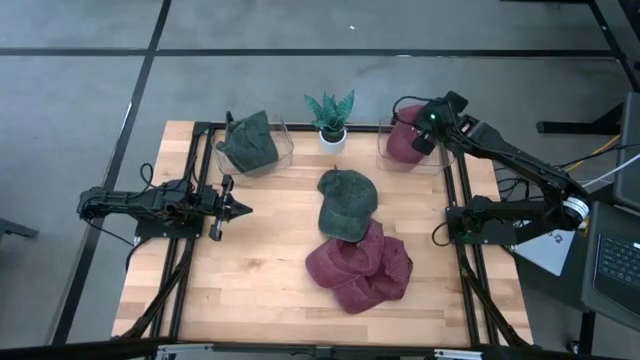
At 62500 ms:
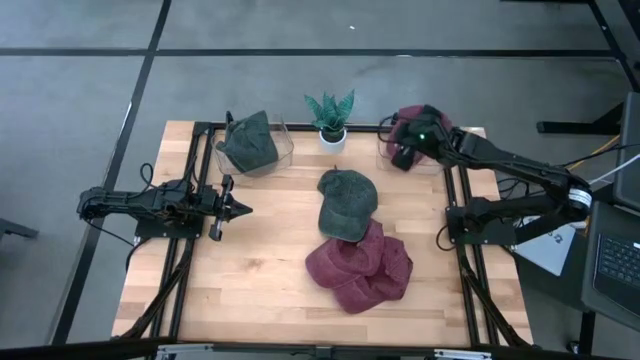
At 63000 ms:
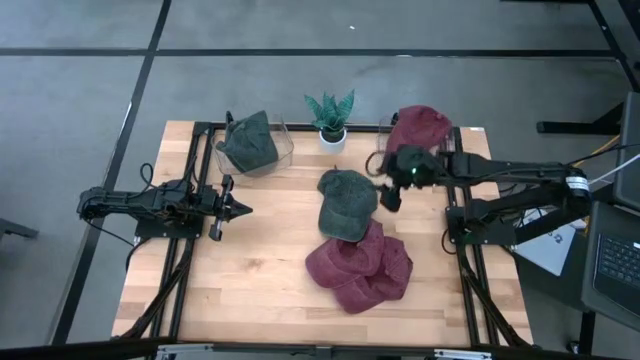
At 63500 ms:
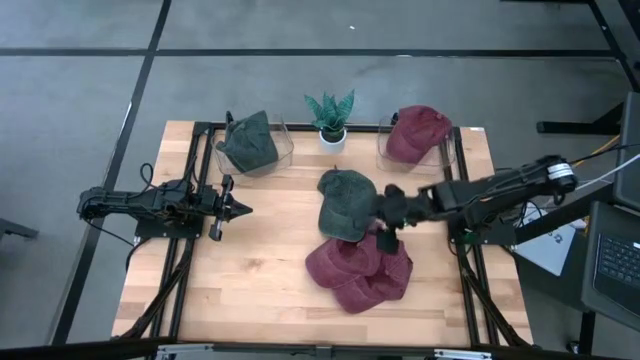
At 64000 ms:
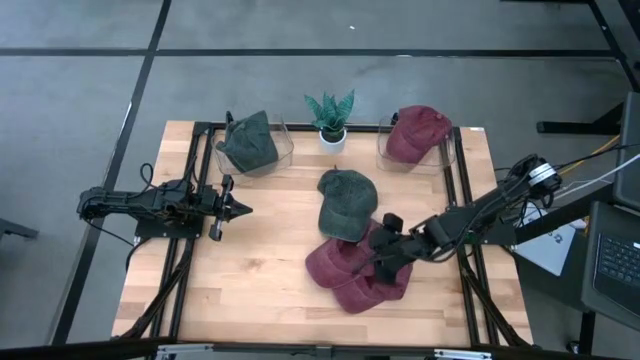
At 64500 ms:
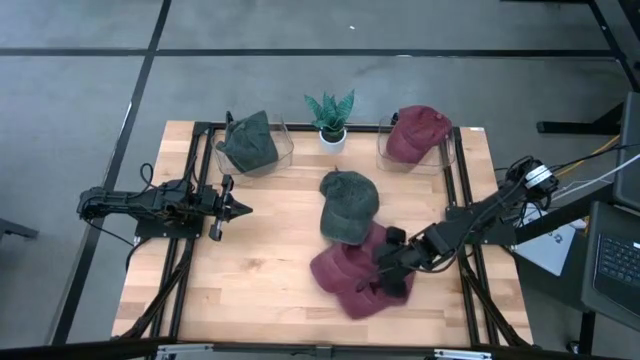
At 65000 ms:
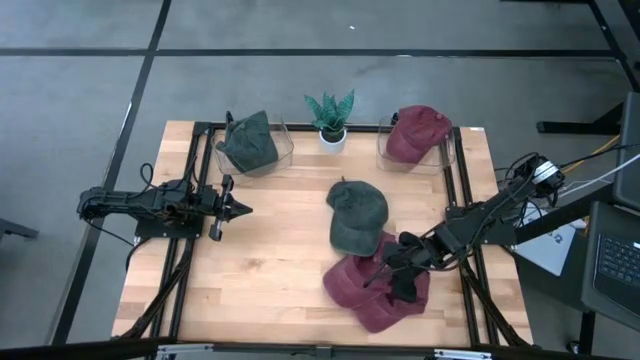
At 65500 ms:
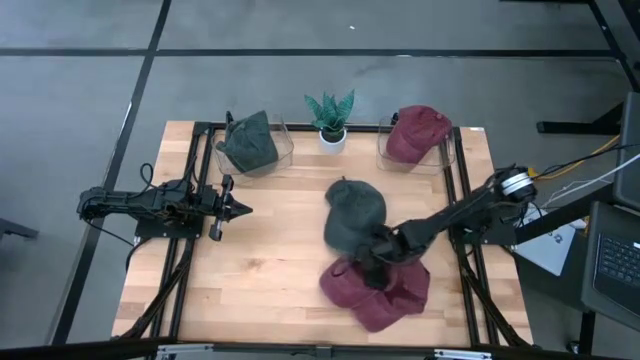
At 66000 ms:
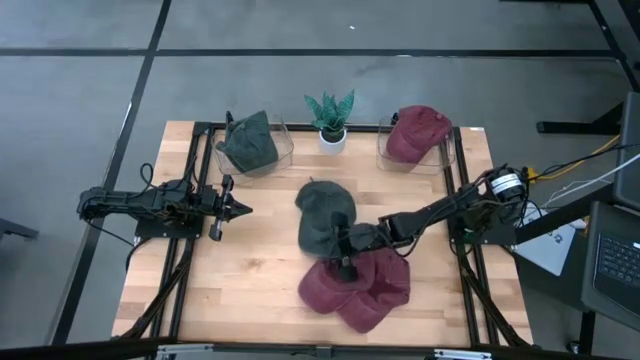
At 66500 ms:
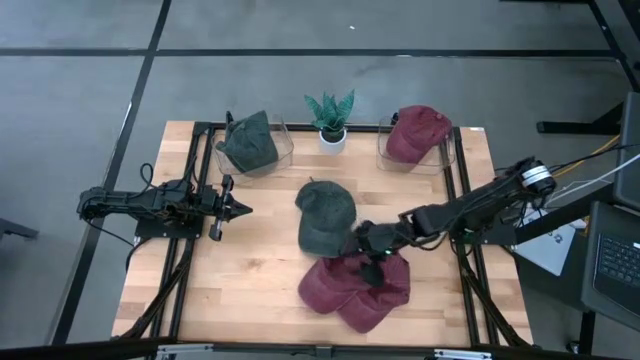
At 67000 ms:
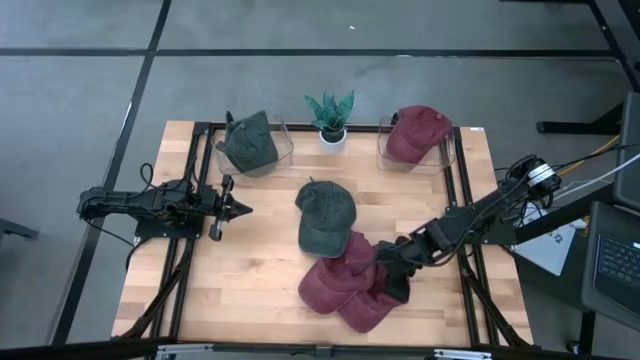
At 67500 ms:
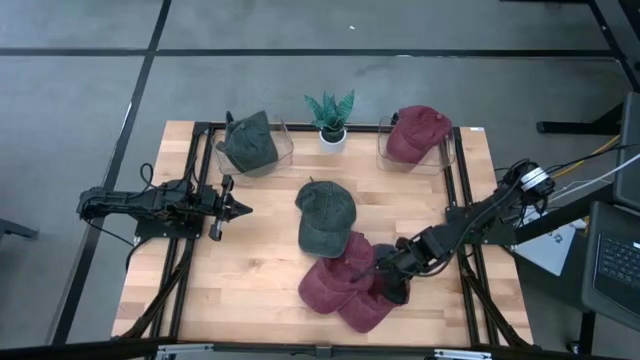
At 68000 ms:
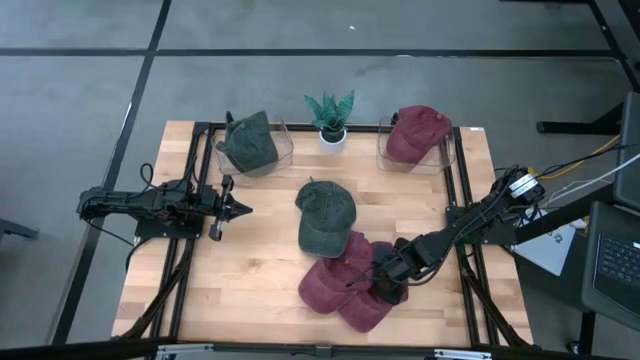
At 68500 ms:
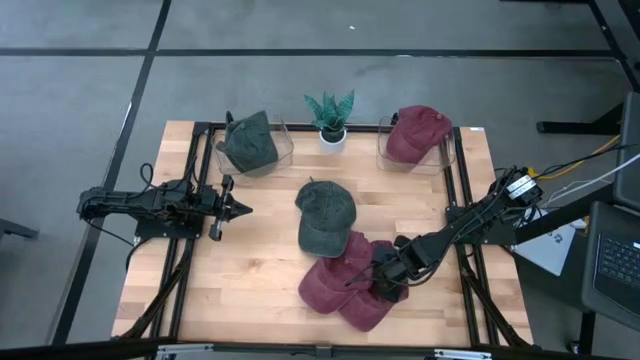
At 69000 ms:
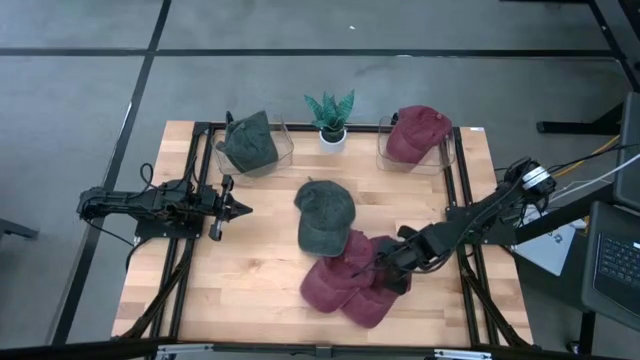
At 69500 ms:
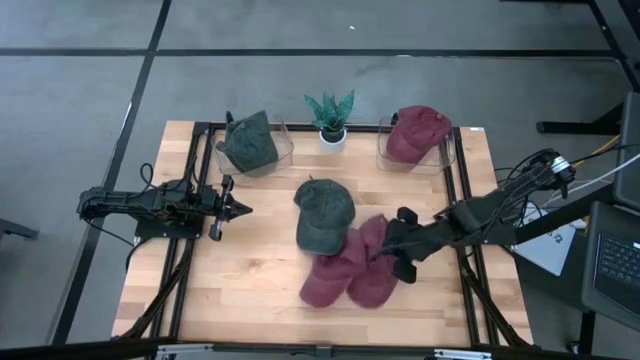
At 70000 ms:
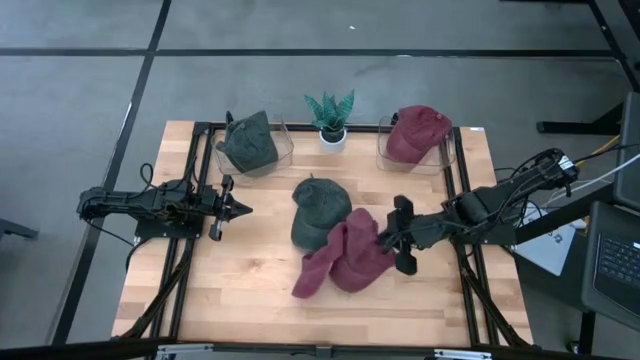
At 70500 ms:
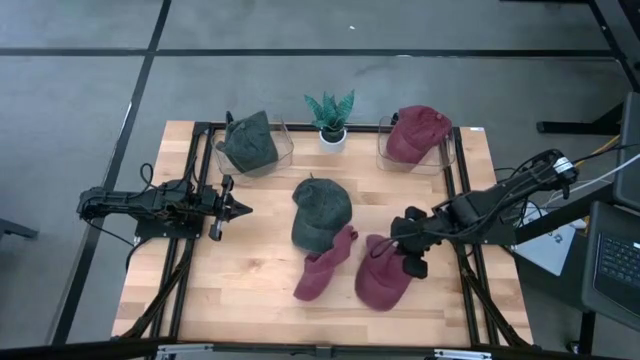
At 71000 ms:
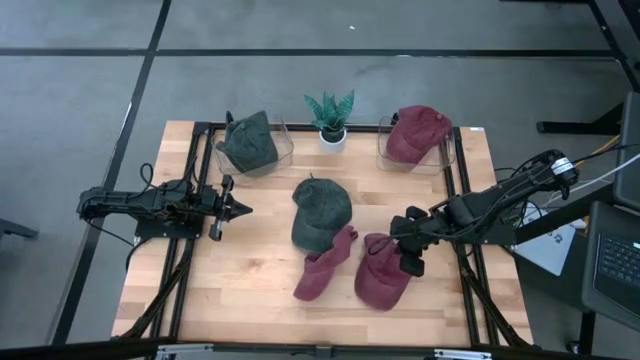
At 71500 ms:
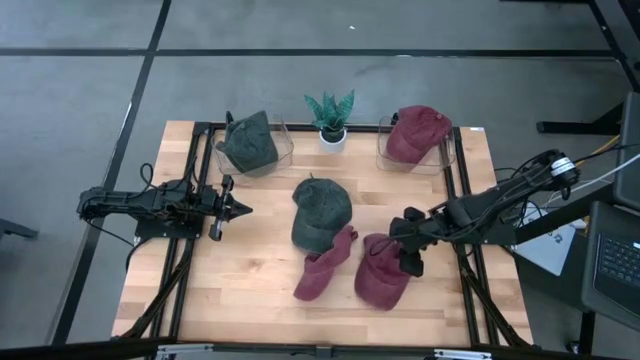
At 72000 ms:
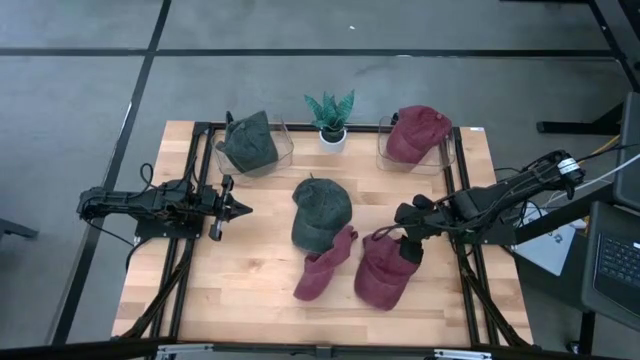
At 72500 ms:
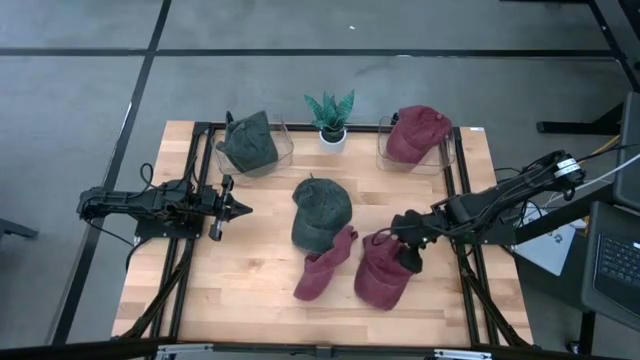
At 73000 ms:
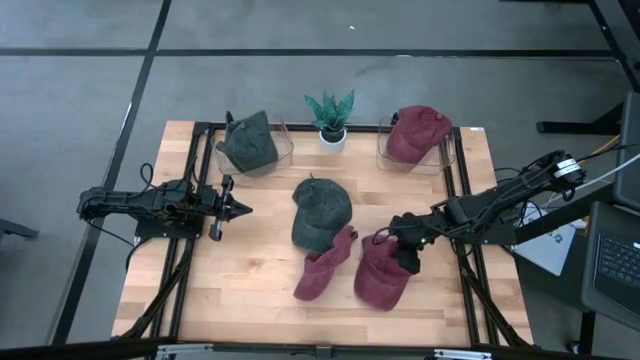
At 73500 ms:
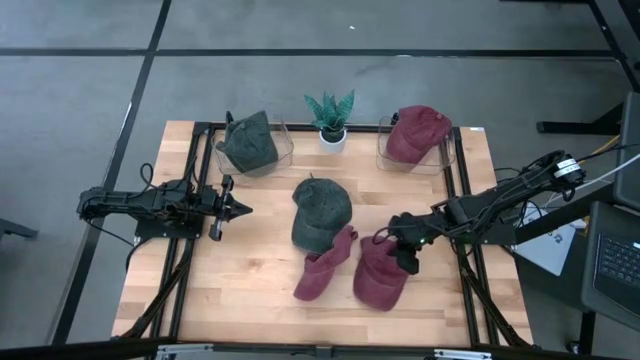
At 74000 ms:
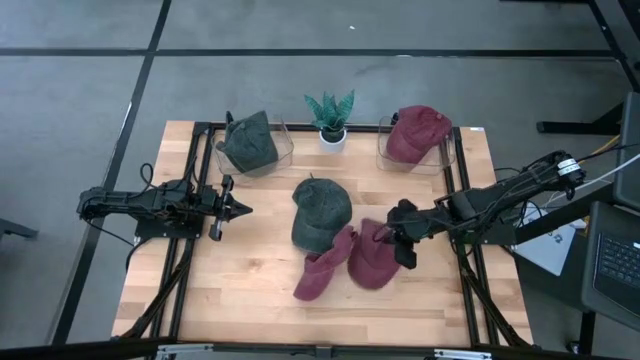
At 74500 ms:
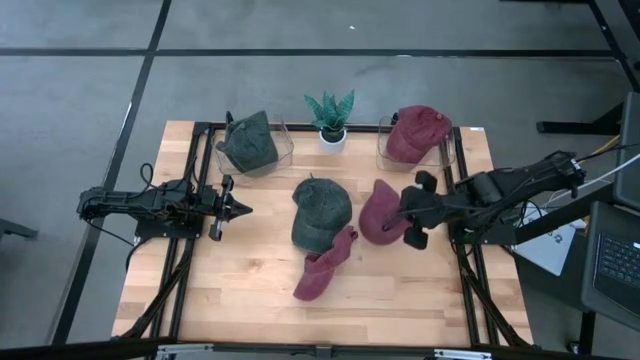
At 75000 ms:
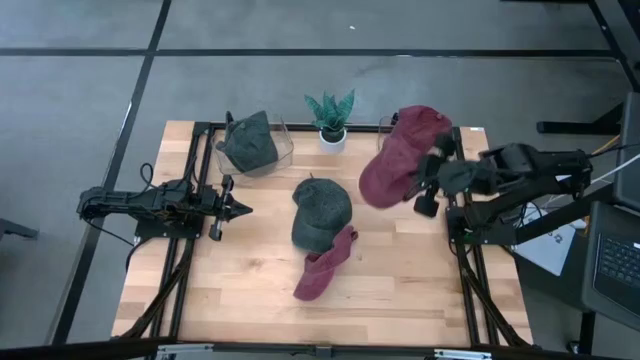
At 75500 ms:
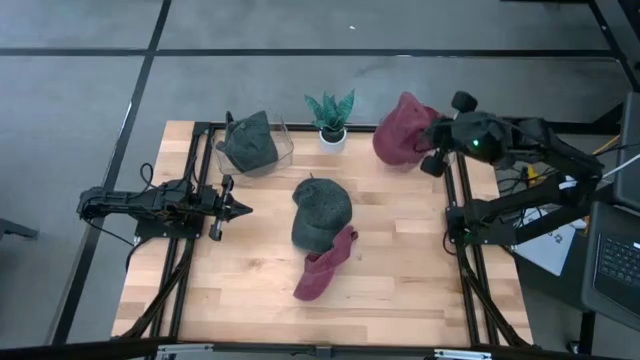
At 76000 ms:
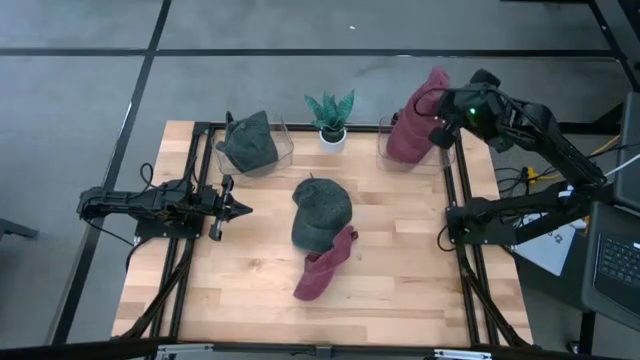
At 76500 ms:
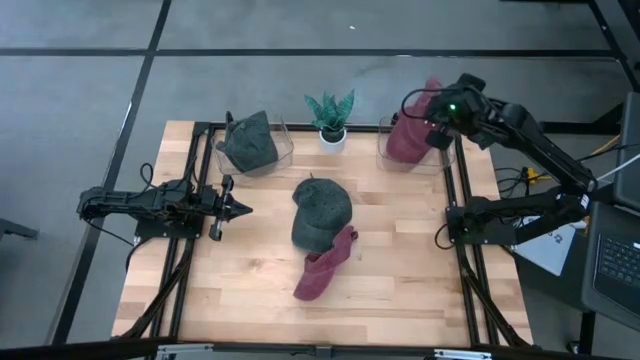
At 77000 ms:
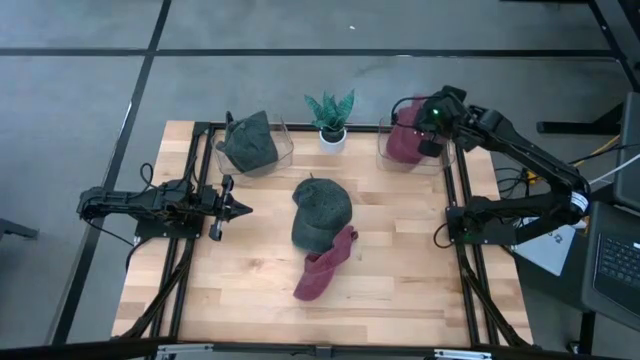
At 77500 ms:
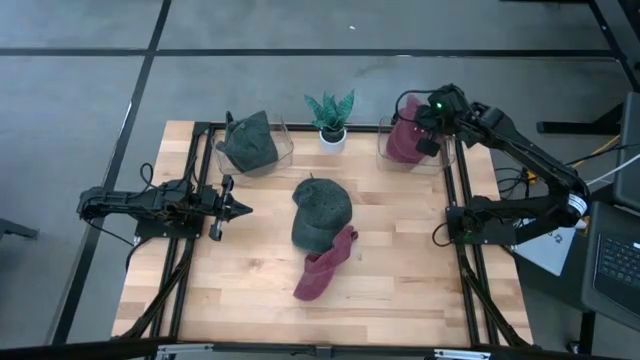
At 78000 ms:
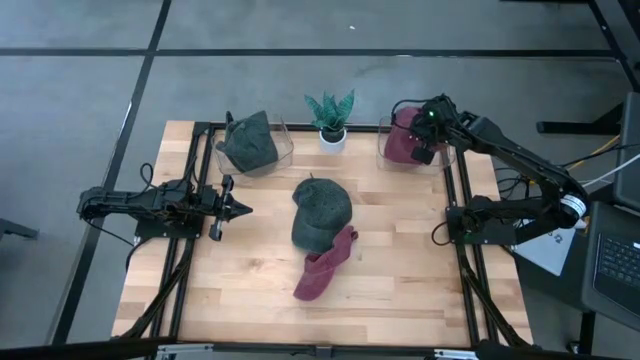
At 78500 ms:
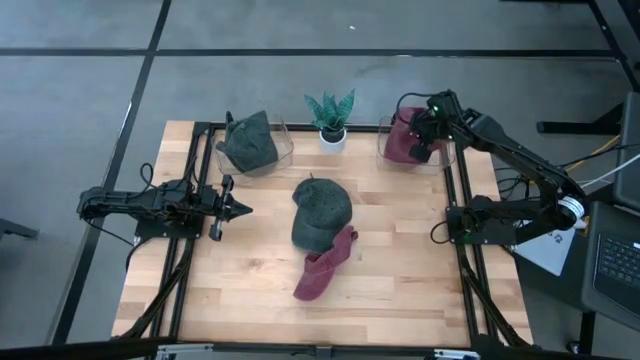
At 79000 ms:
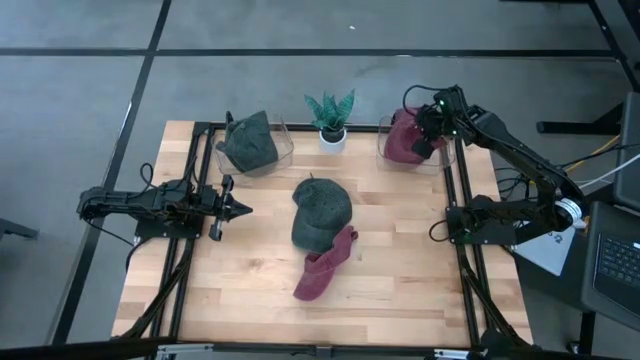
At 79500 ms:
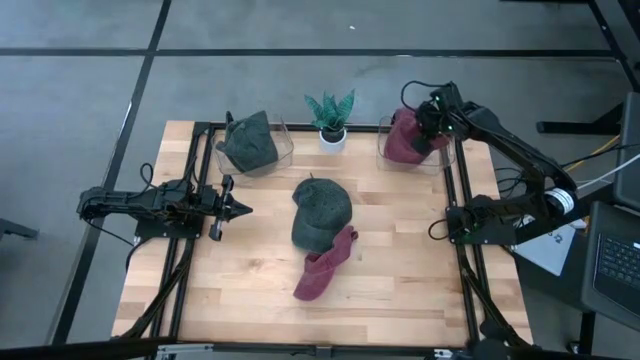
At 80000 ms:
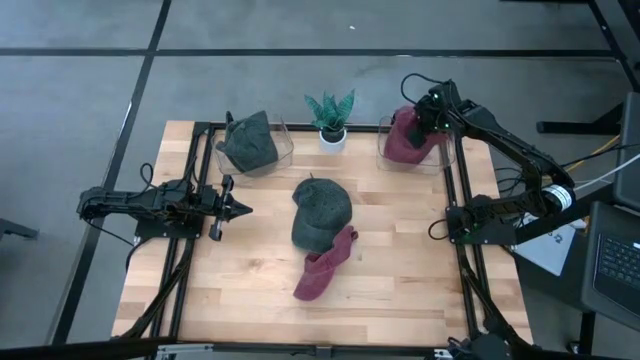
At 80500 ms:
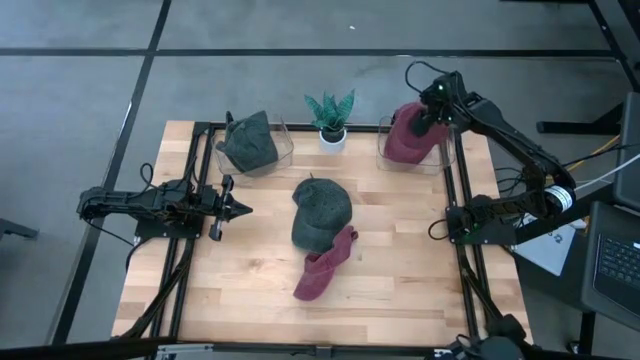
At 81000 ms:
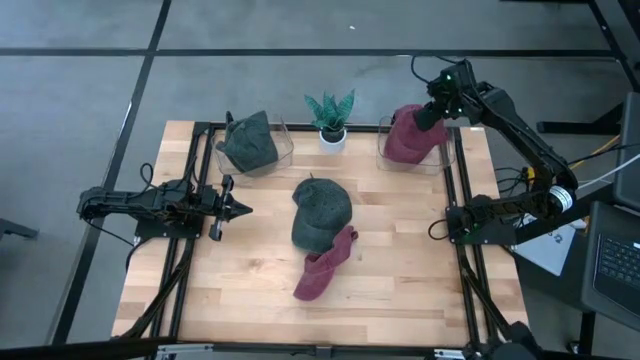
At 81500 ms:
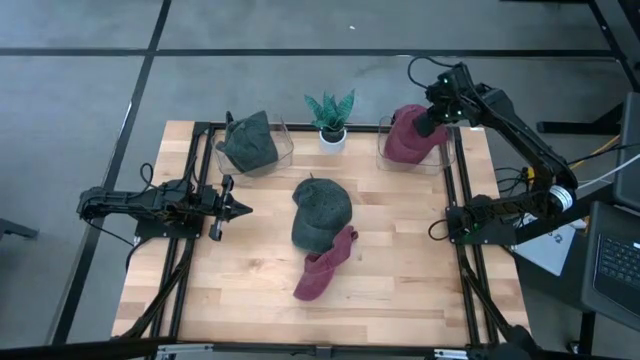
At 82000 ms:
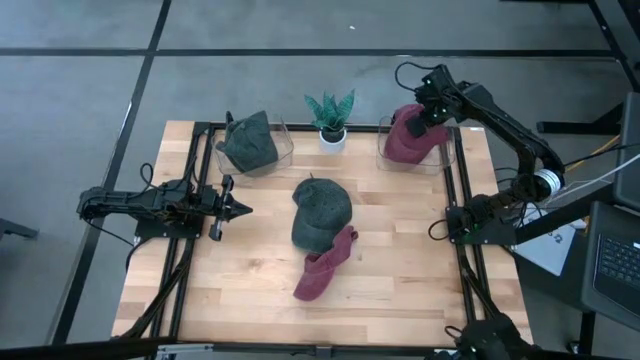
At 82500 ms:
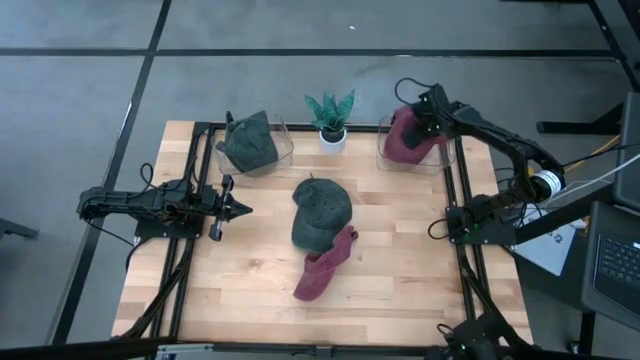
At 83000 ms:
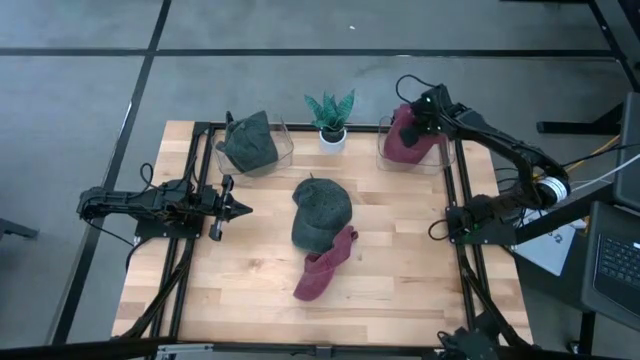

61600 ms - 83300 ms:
Task: Pick & Place hat
Put the right red cap into the right transparent bin
